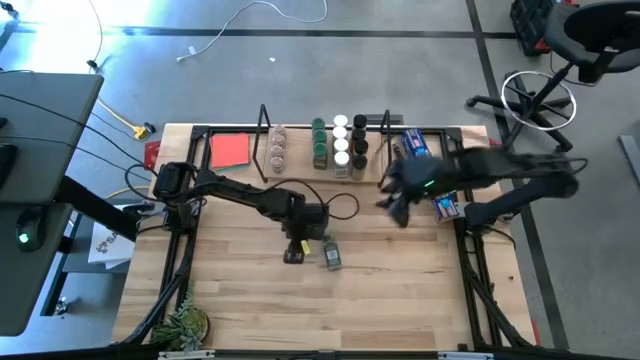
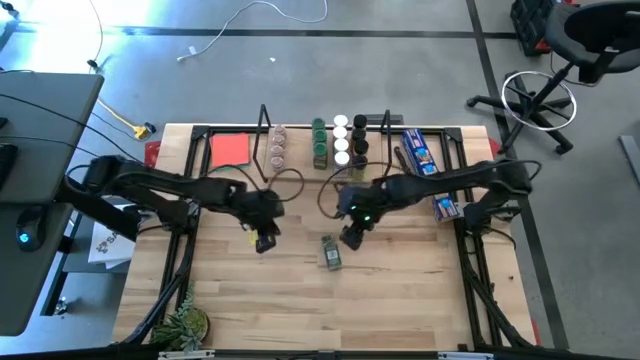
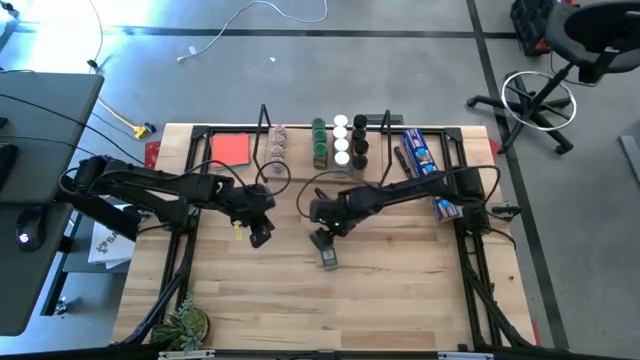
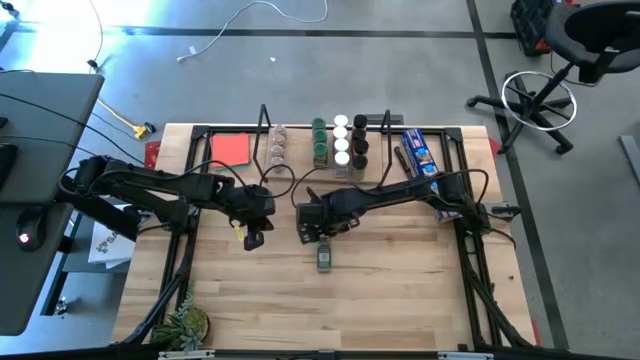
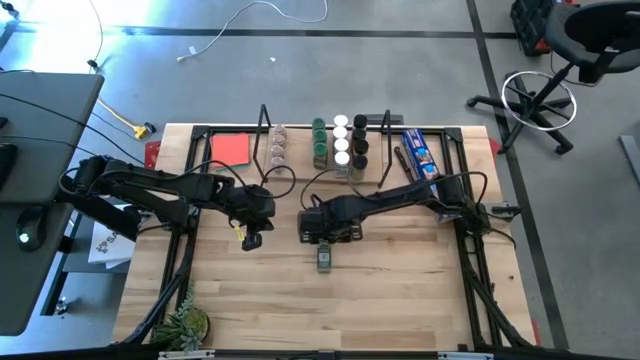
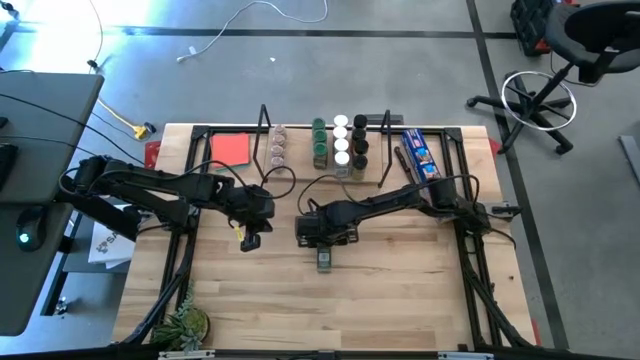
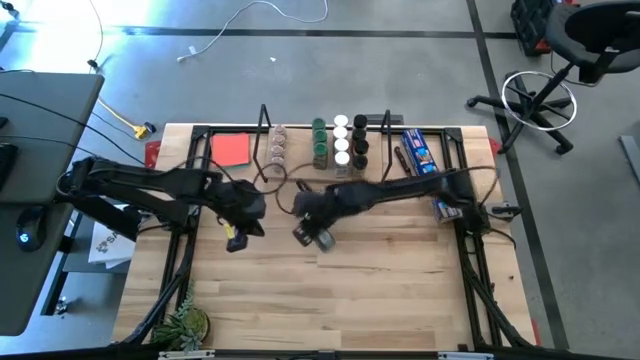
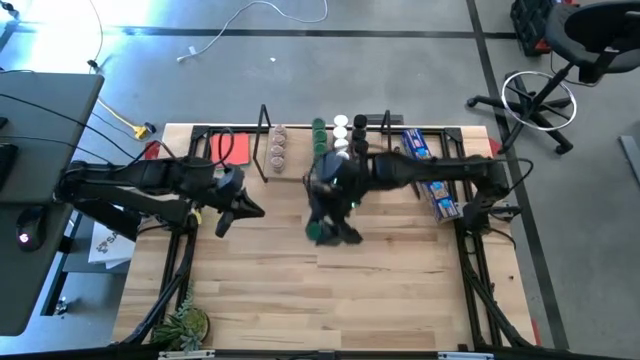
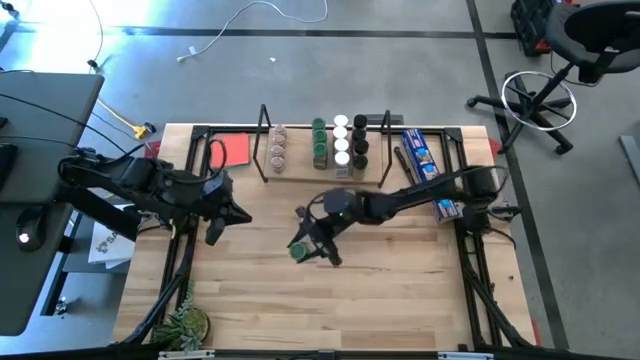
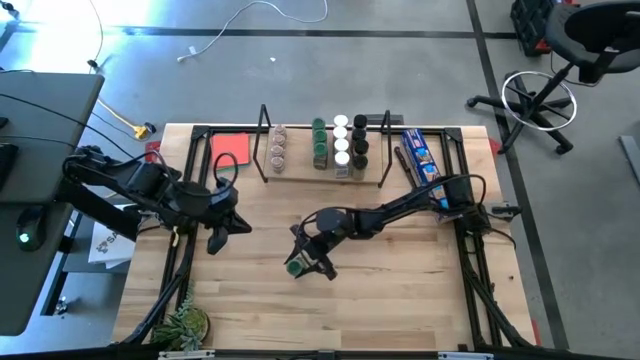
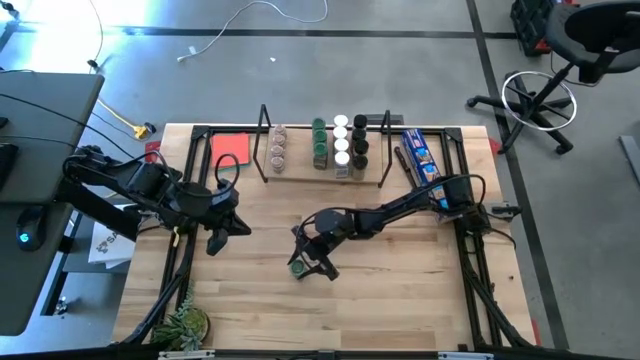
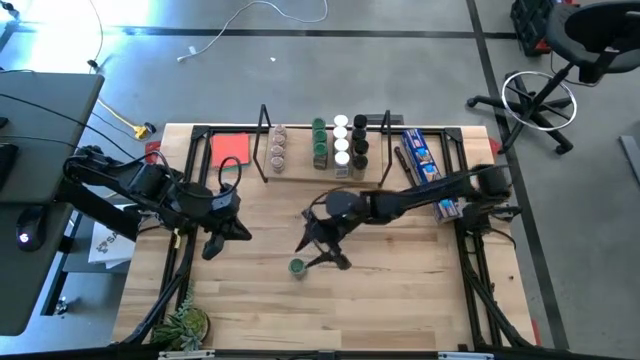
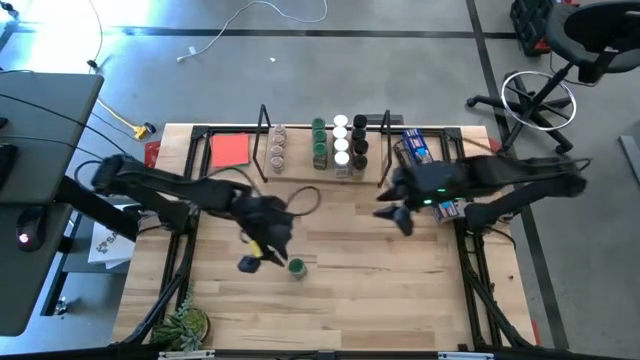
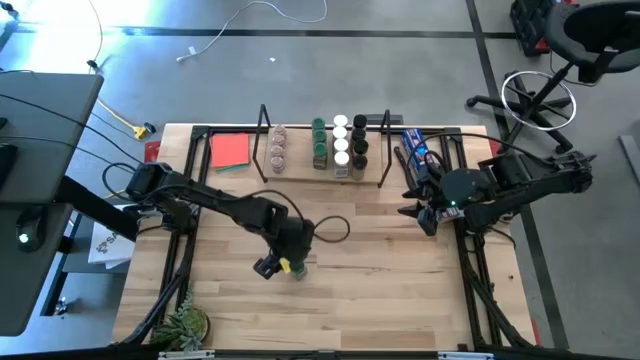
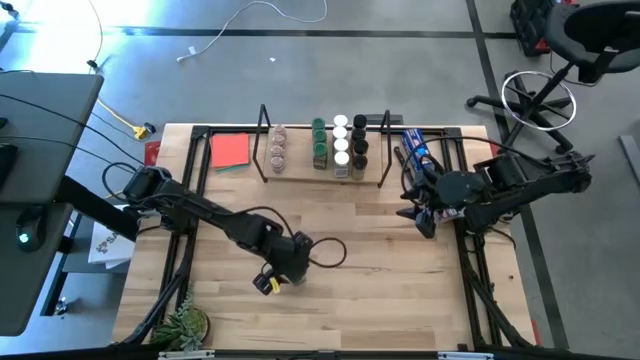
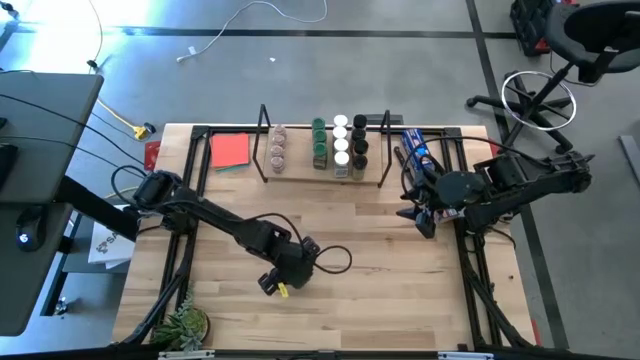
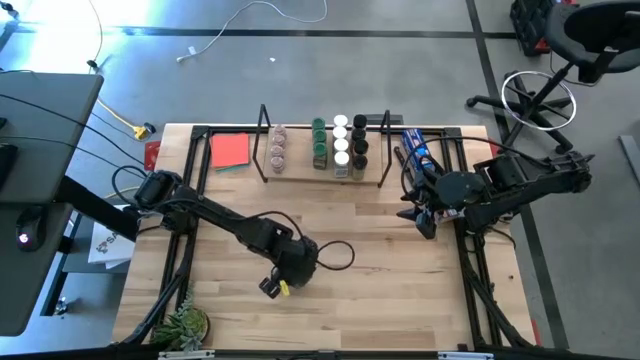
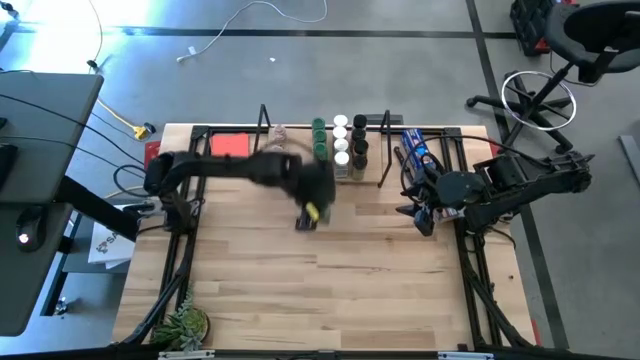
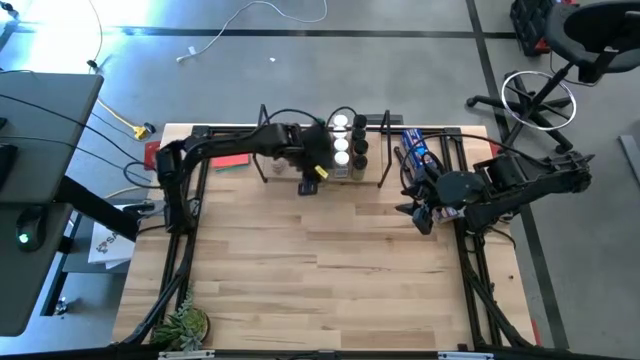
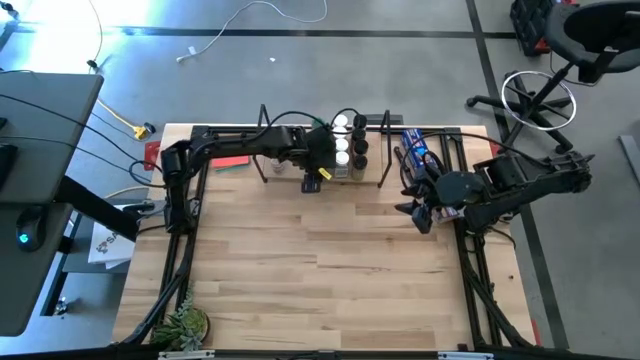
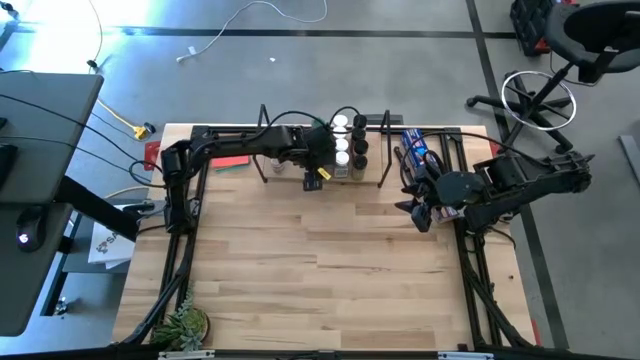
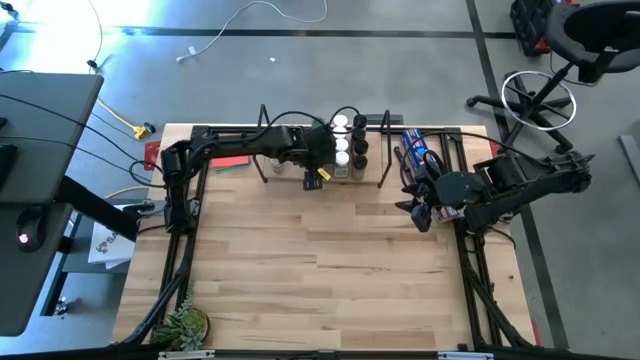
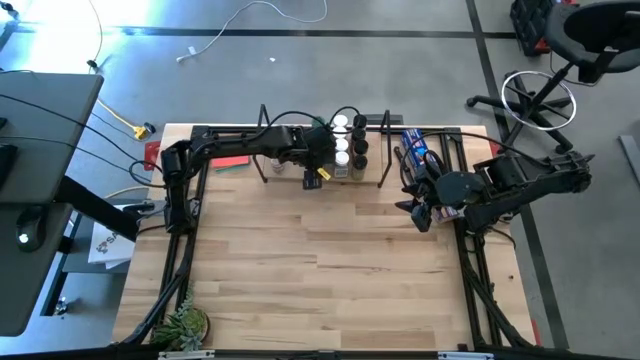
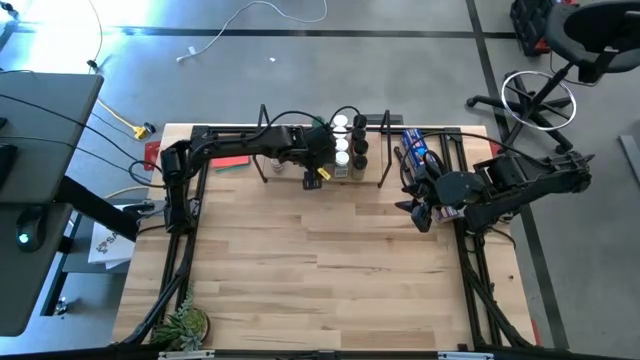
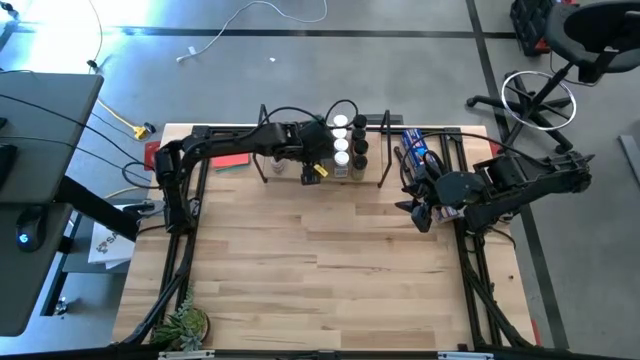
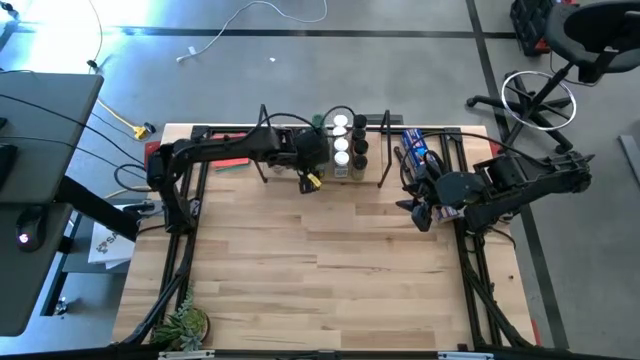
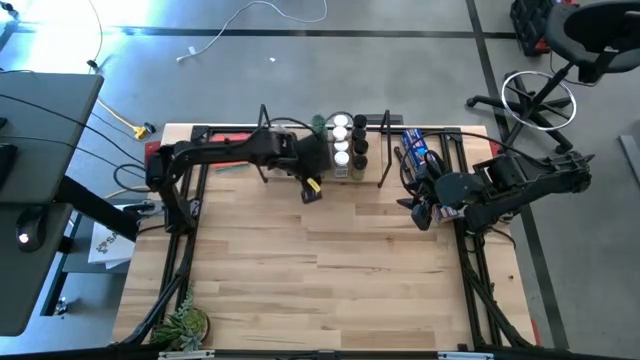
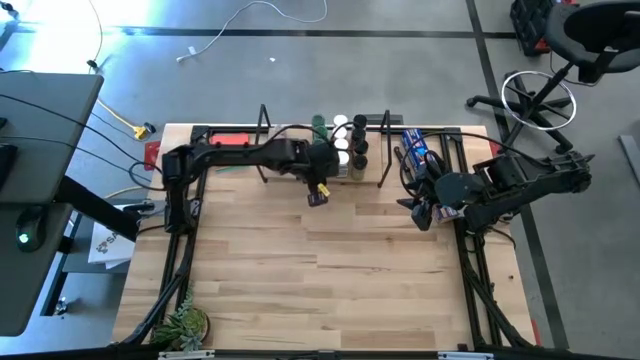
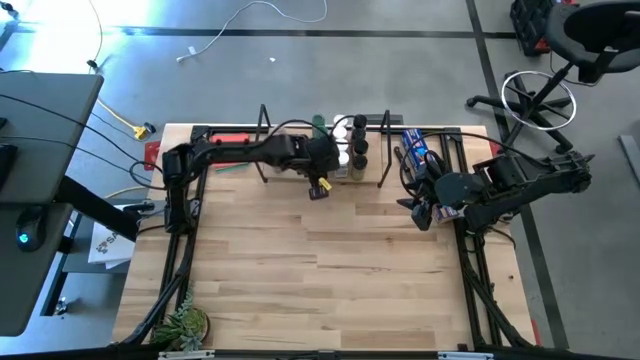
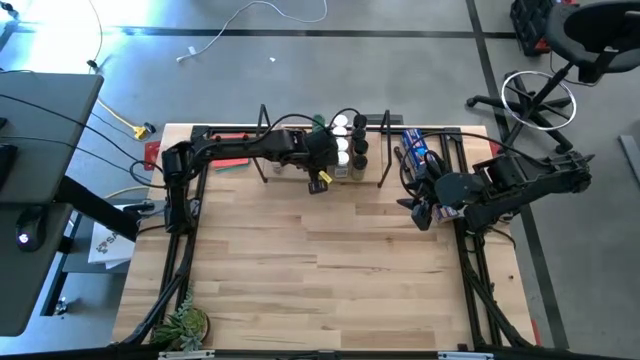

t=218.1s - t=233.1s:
Task: Shelf spices
Put the green seasoning bottle on the shelf aligned with the other green seasoning bottles

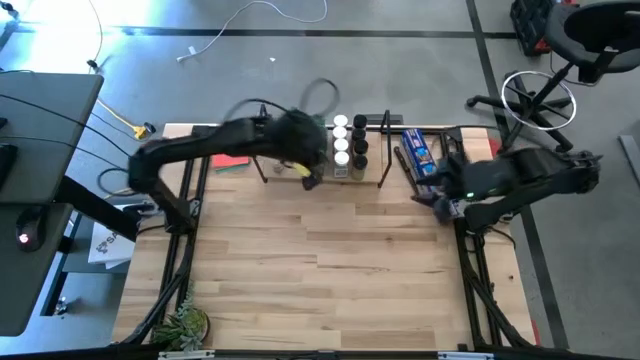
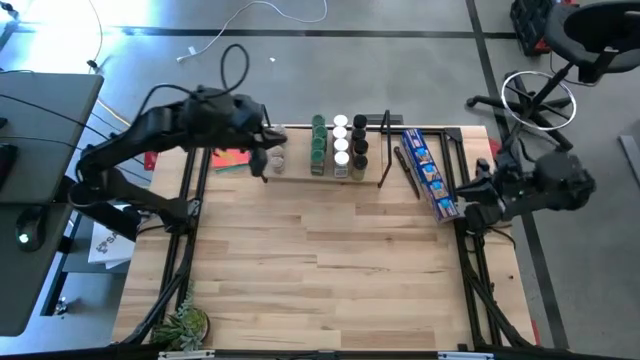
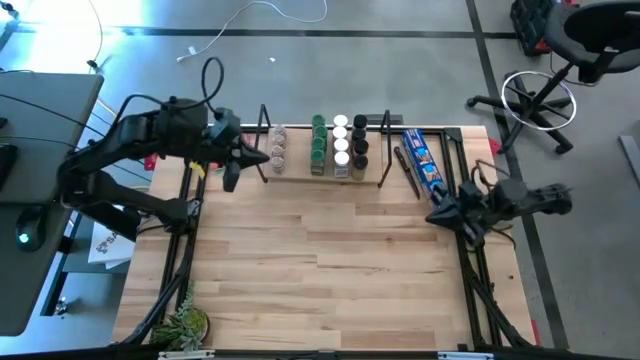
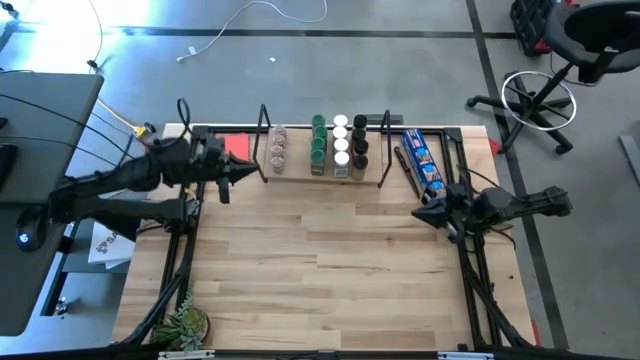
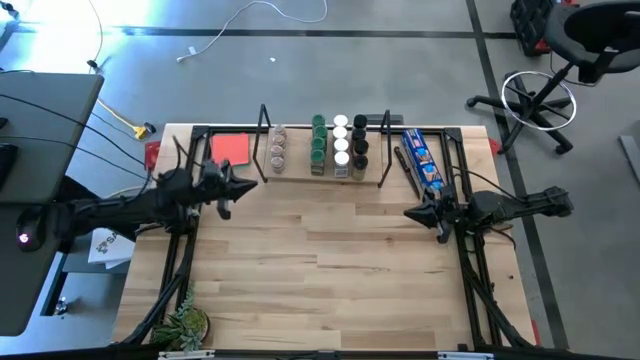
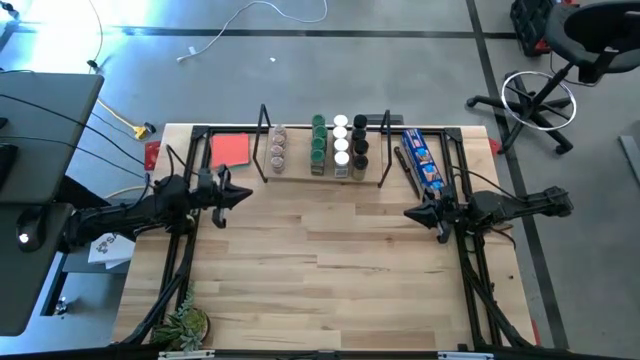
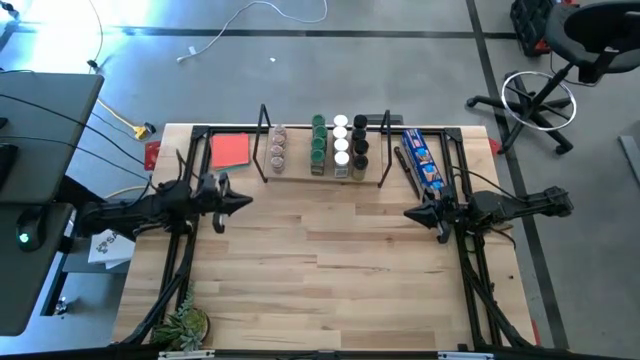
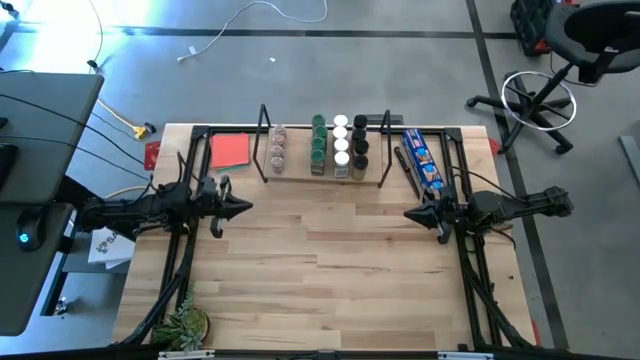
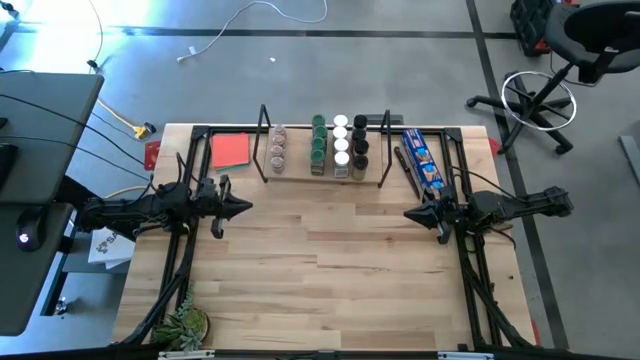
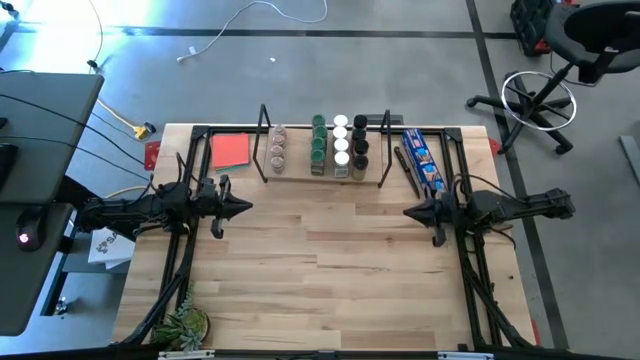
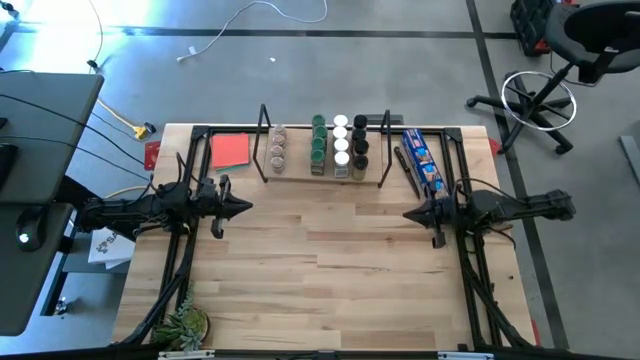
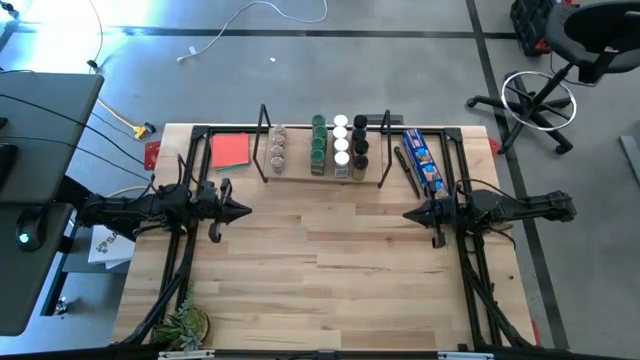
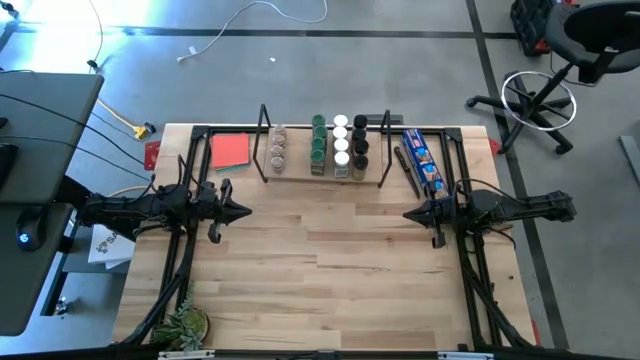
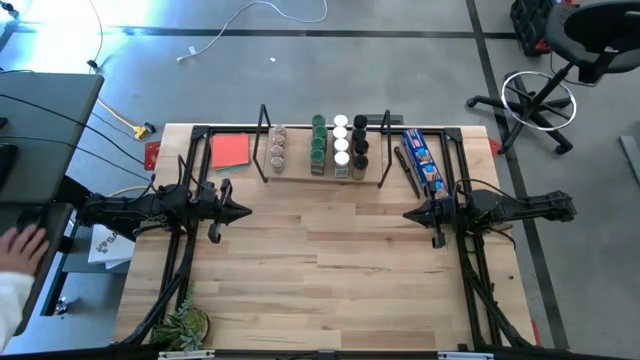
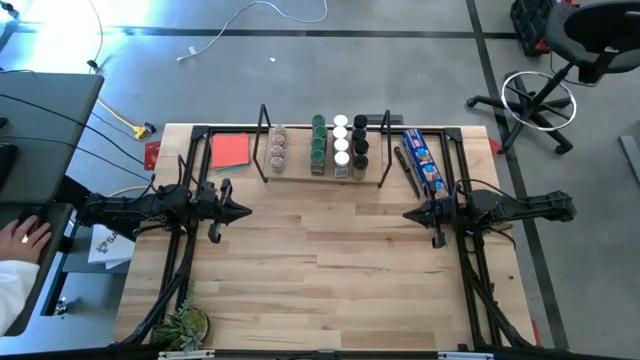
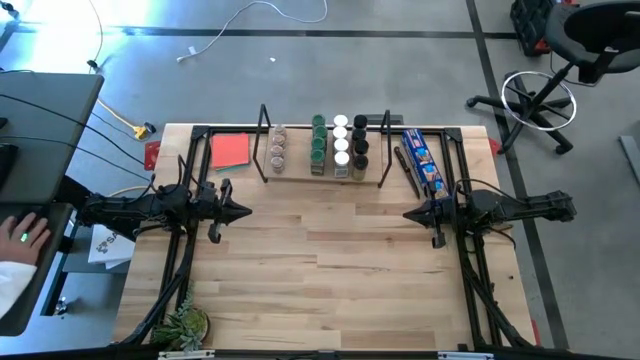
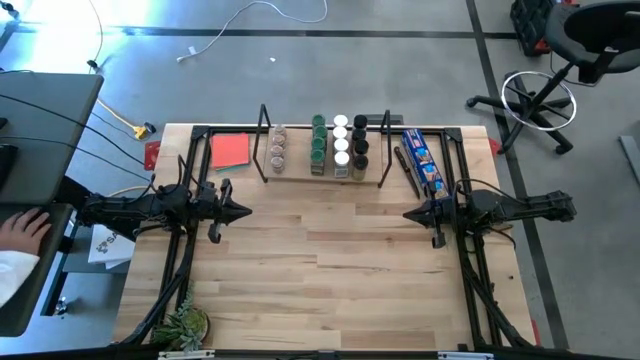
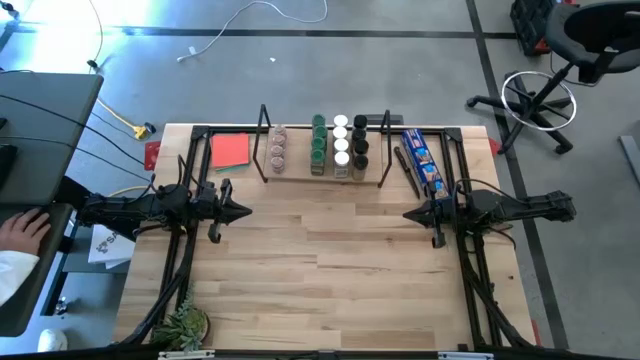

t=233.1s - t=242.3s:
Return to Home Position
